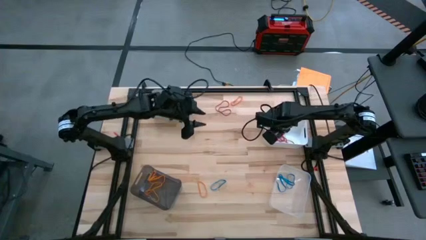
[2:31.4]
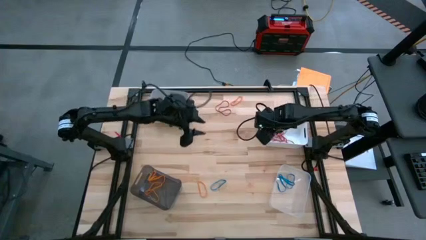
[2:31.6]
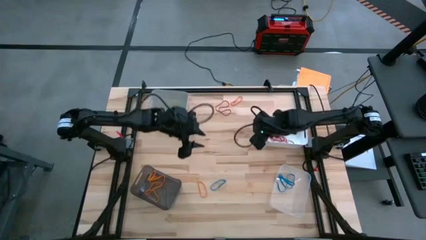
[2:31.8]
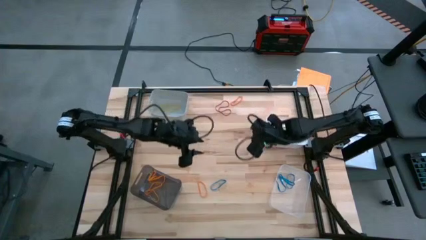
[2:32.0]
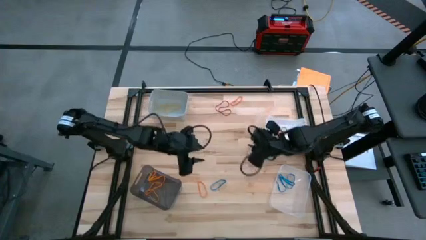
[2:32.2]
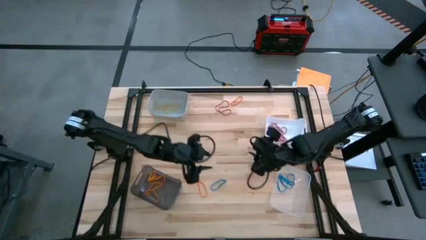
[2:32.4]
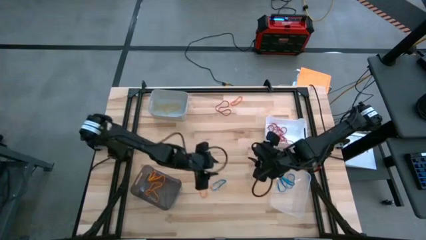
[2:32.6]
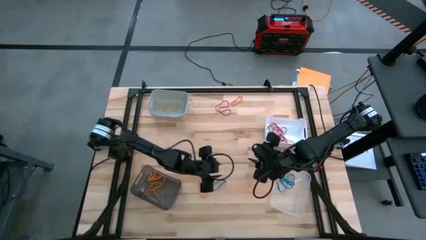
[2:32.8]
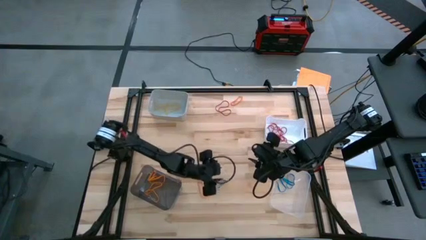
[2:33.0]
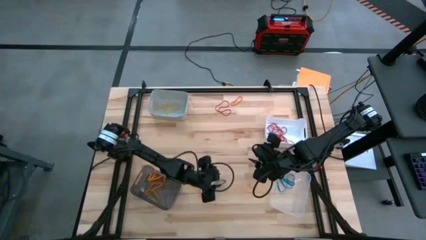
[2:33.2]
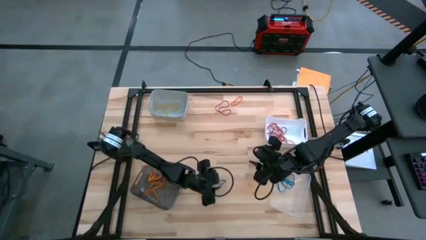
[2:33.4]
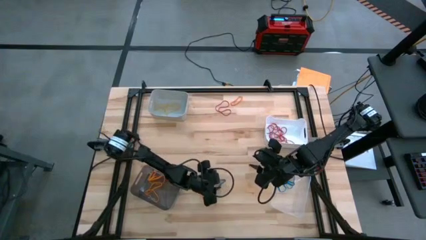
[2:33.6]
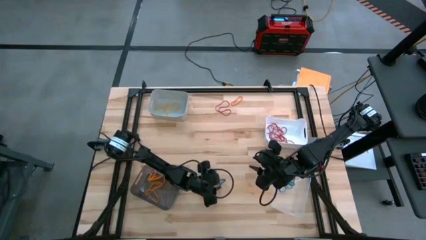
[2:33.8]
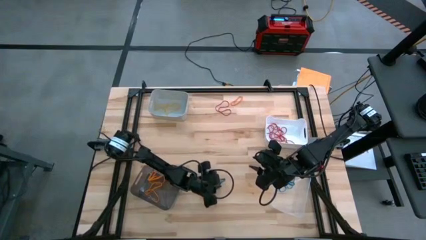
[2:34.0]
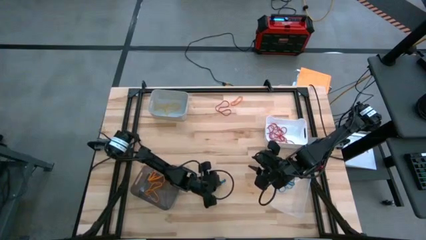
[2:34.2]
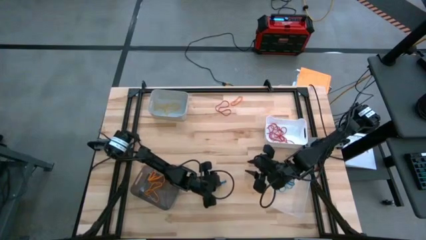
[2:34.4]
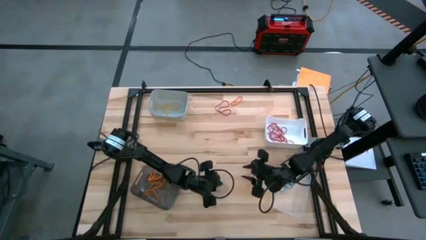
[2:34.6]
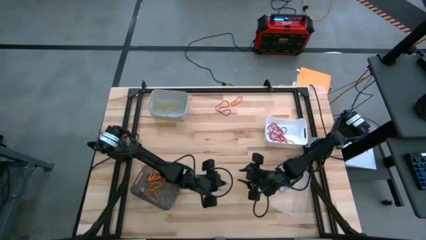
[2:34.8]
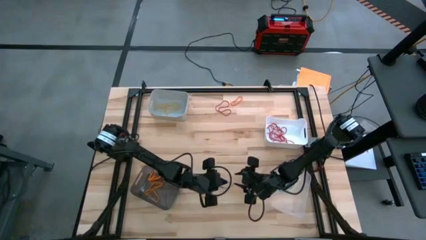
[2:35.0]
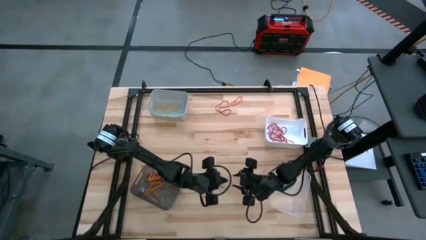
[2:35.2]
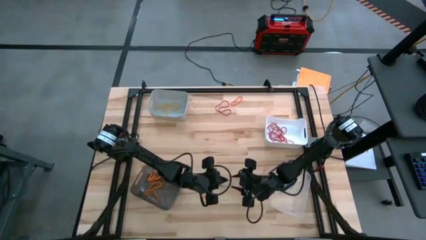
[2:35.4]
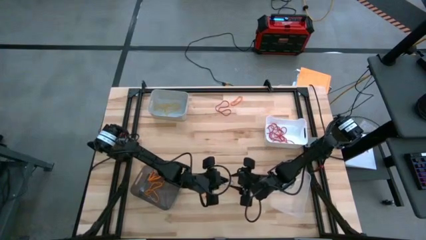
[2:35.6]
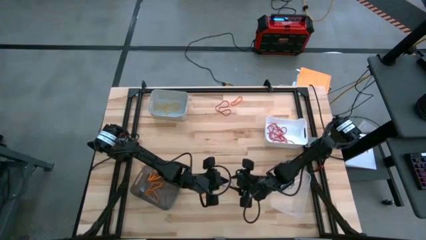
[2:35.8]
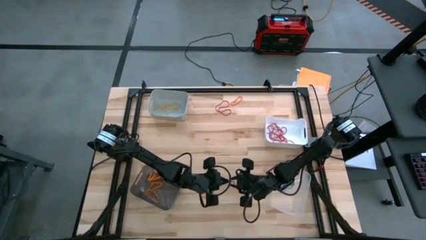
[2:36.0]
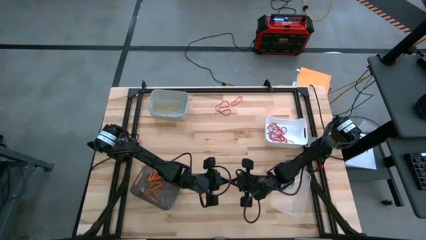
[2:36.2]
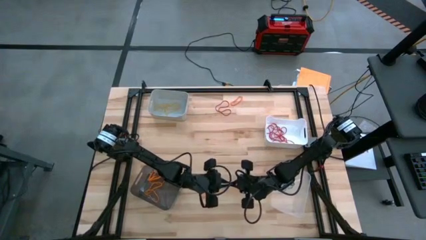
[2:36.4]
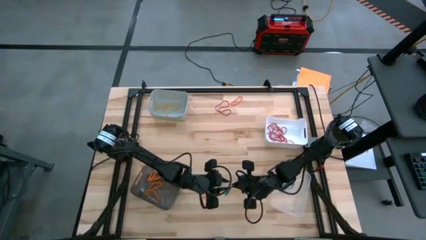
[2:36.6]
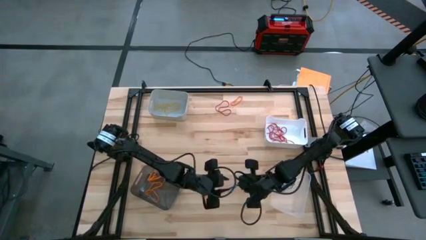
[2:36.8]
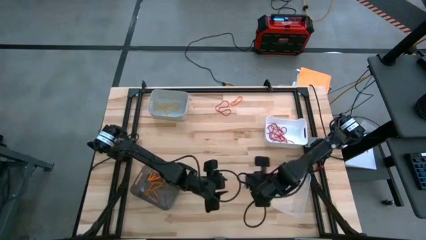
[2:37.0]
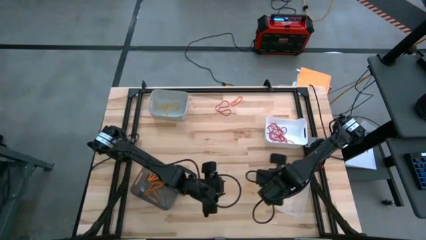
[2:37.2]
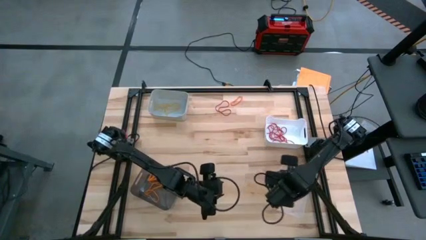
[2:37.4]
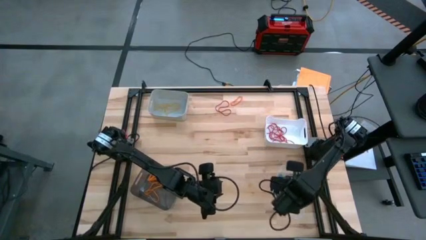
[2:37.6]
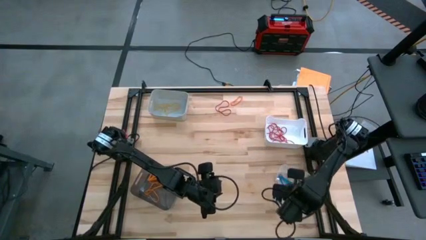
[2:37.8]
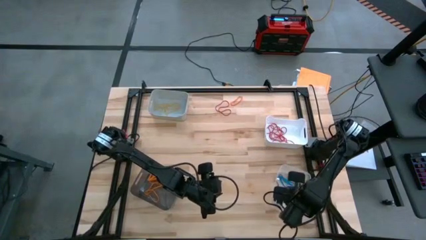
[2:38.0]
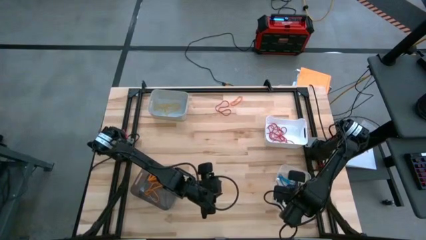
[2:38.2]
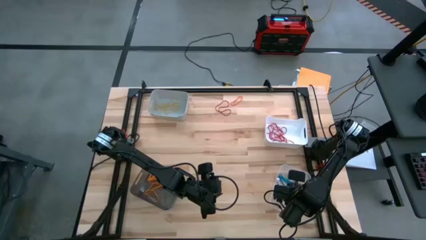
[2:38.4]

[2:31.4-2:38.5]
Task: Sort rubber bands into baskets
Put the blue rubber band into the transparent bin

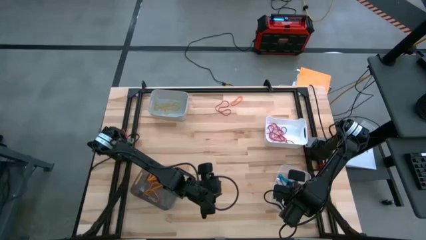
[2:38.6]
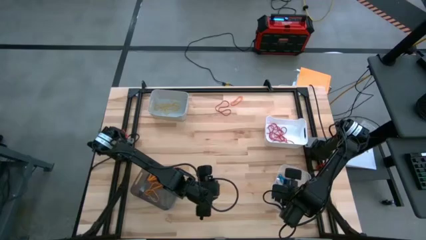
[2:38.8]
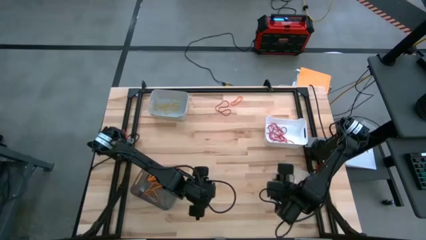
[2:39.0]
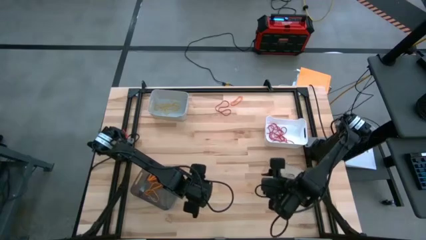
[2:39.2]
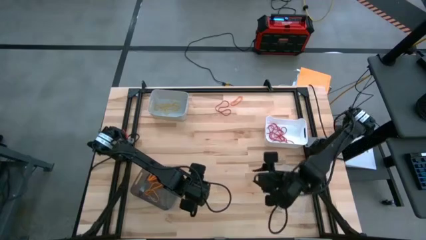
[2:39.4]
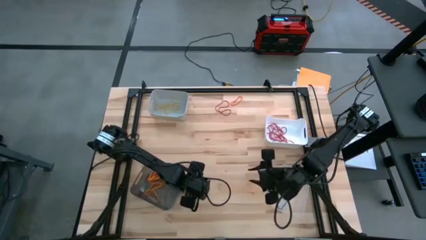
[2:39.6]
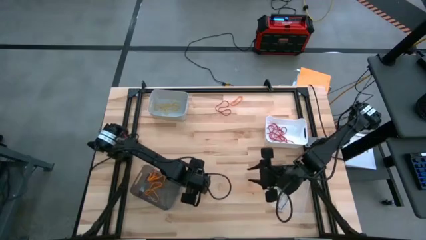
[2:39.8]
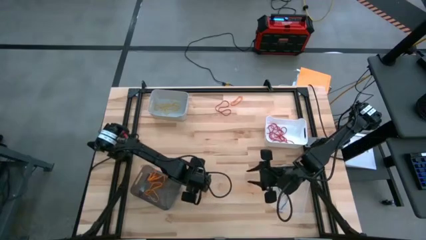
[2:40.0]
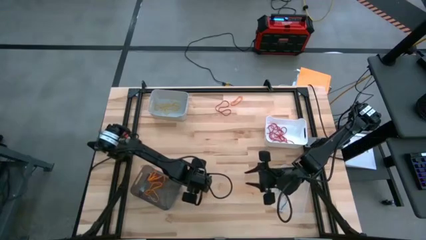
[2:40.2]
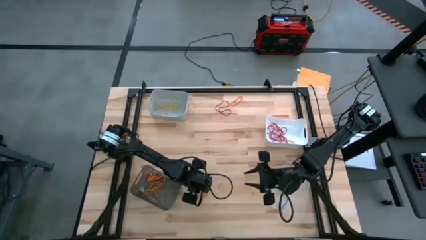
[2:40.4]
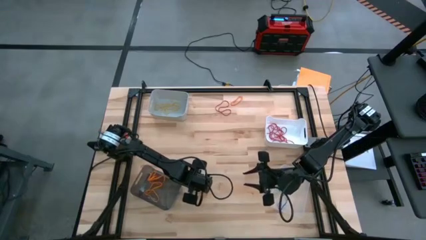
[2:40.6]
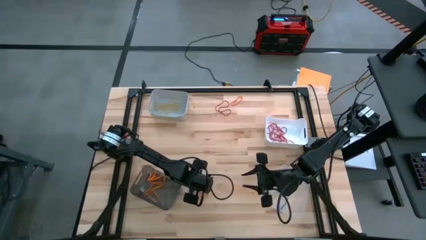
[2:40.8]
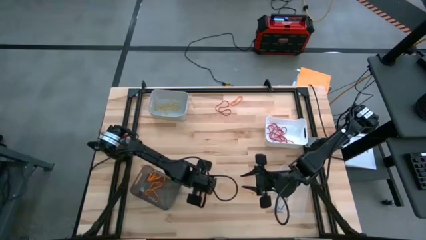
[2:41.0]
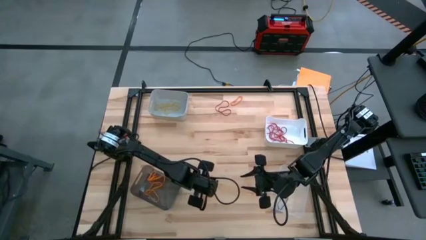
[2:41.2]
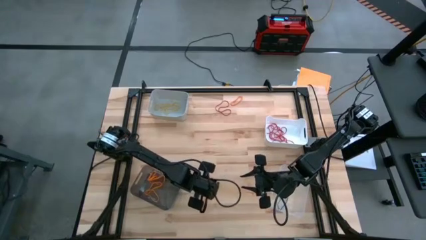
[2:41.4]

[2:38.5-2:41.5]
Put the orange rubber band into the black bin

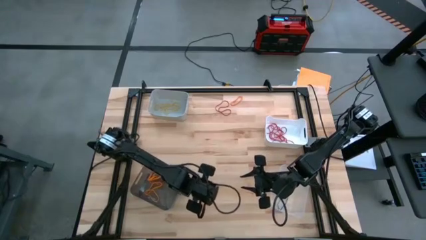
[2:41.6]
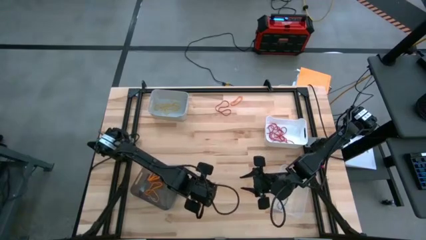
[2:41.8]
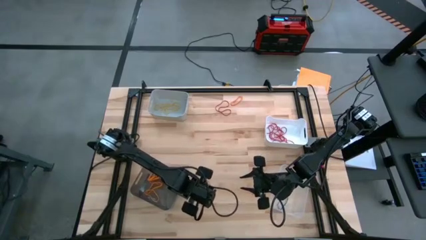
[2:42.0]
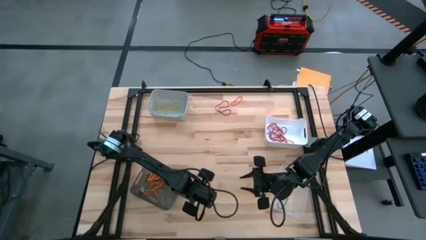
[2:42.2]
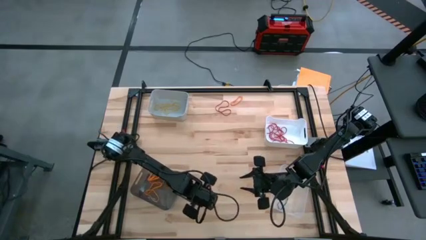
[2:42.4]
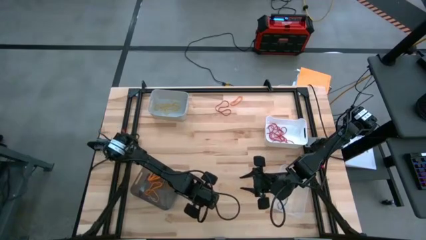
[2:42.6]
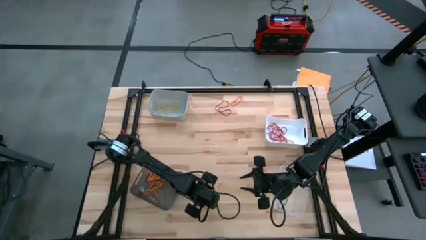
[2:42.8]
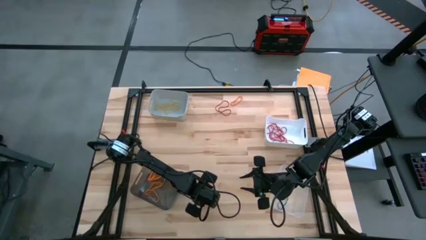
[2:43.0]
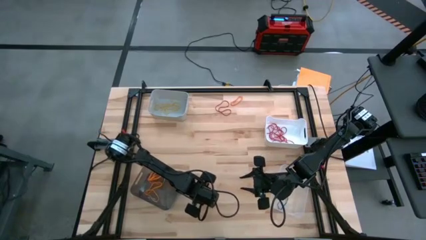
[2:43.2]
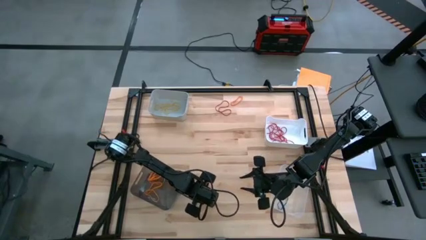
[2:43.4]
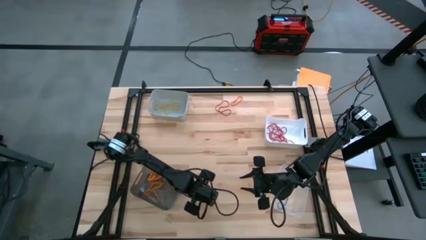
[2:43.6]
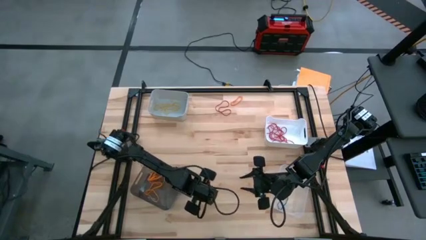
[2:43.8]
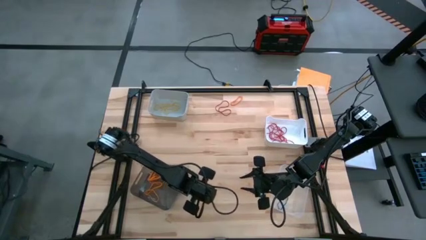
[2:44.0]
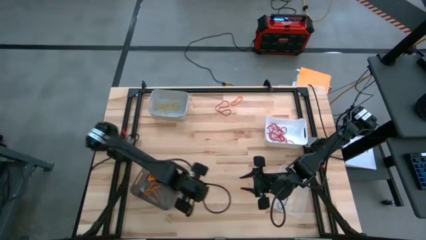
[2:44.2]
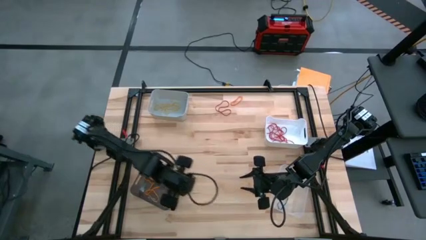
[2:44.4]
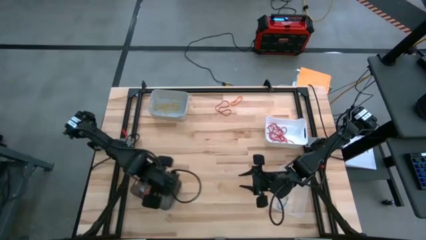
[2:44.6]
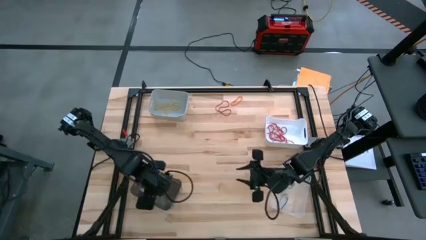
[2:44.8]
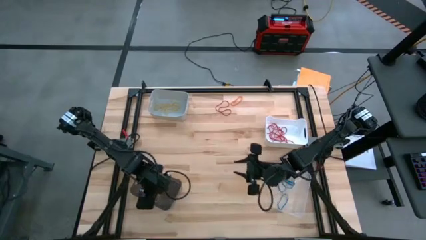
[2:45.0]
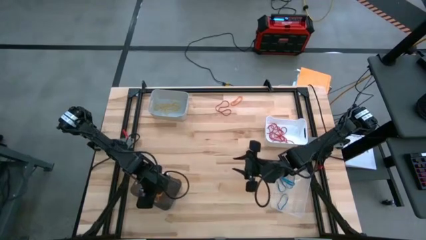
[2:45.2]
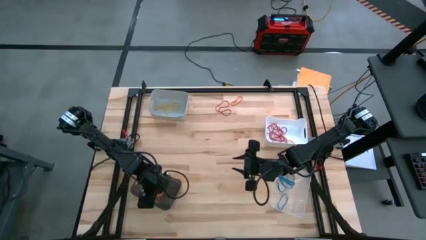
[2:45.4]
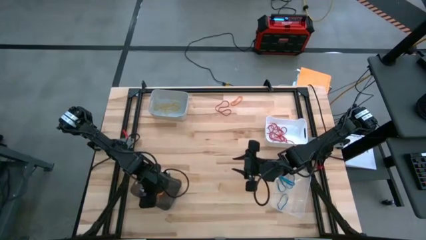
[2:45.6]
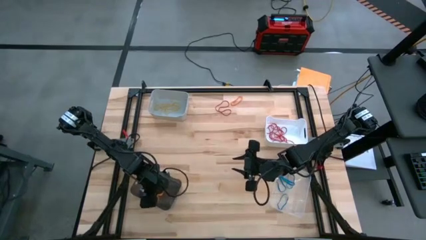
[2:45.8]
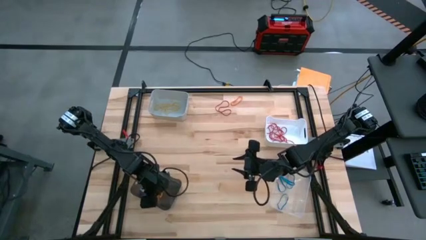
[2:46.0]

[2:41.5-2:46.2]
Put the orange rubber band into the black bin

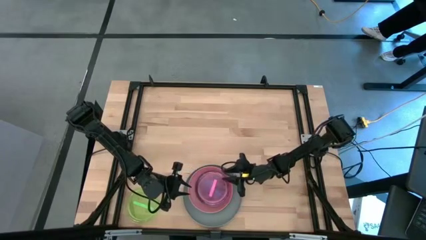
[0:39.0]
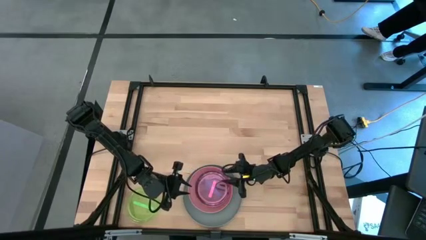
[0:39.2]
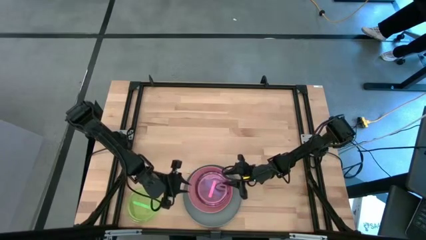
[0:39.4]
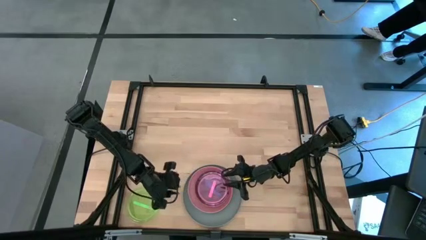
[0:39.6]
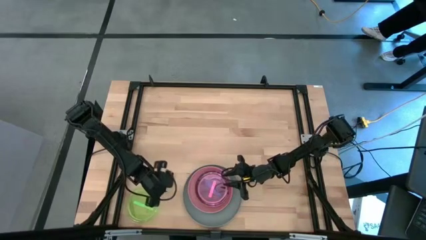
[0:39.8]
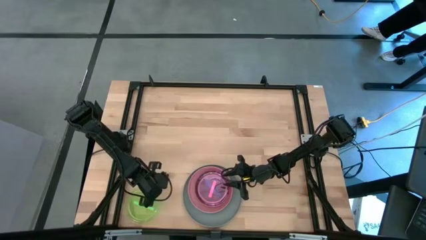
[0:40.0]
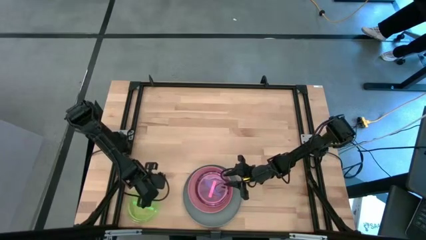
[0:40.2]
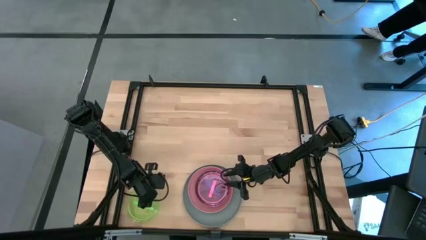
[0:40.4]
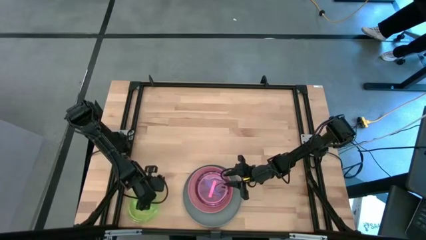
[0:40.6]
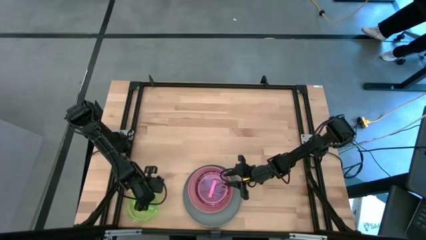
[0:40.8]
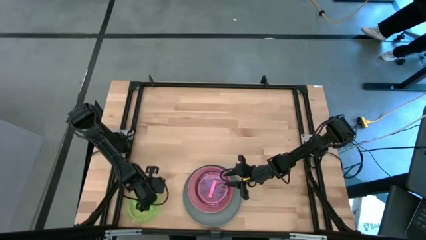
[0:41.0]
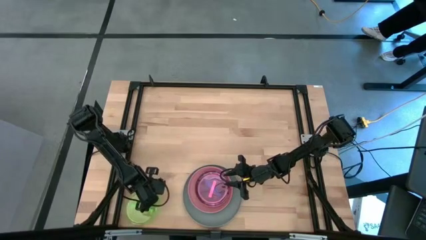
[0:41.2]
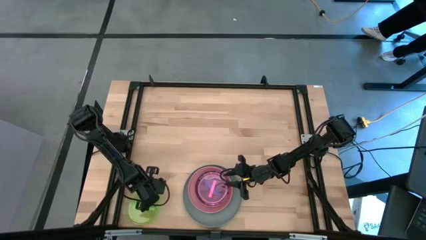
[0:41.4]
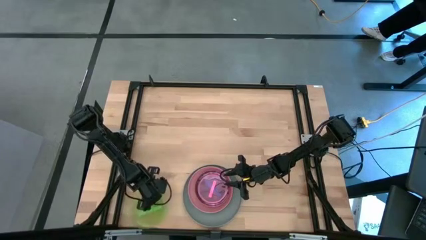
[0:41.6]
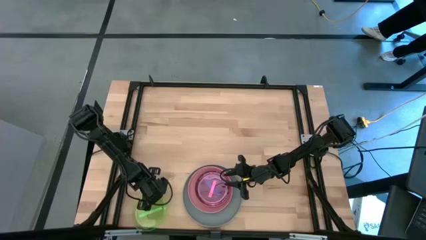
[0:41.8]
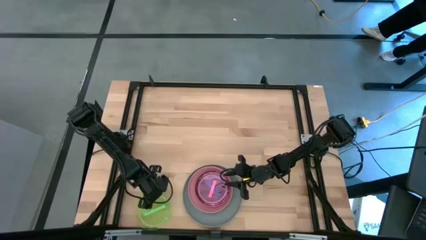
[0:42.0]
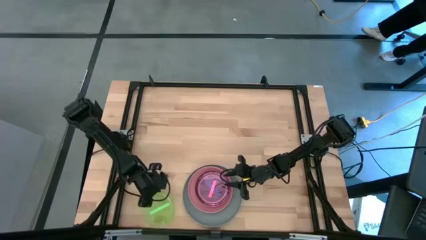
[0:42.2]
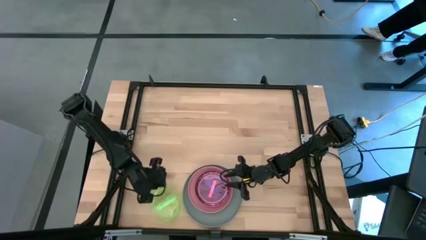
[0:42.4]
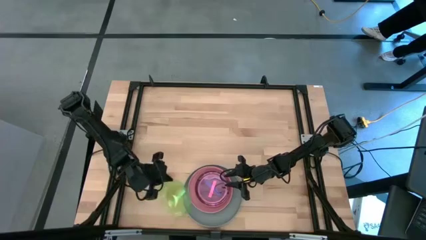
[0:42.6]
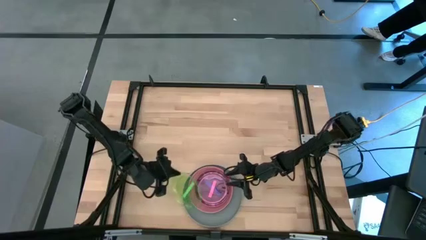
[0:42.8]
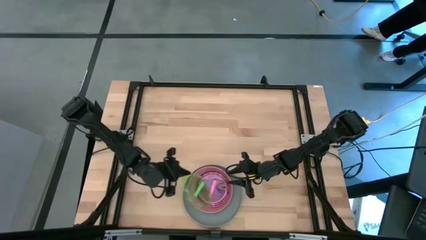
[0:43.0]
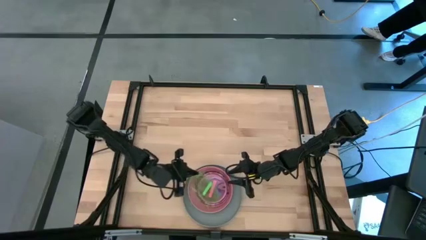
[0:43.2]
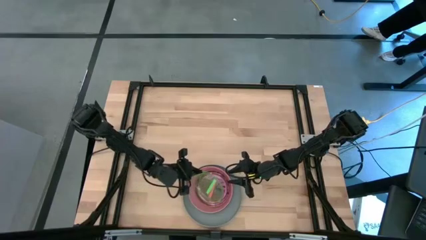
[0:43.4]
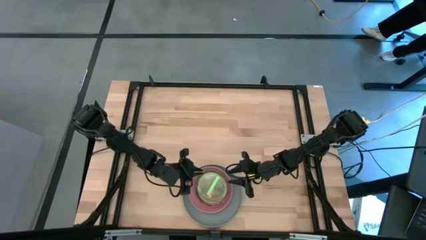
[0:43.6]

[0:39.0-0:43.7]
Task: Stack plastic plates
Stack the green plate on top of pink plate
